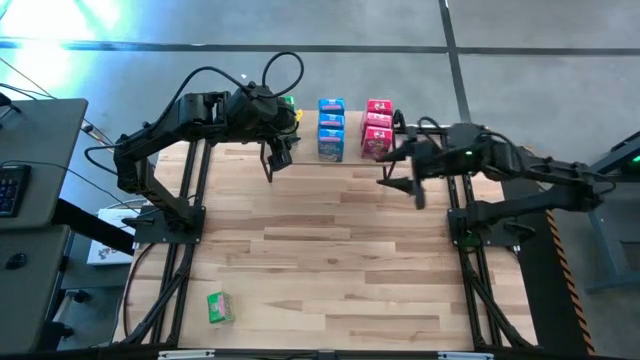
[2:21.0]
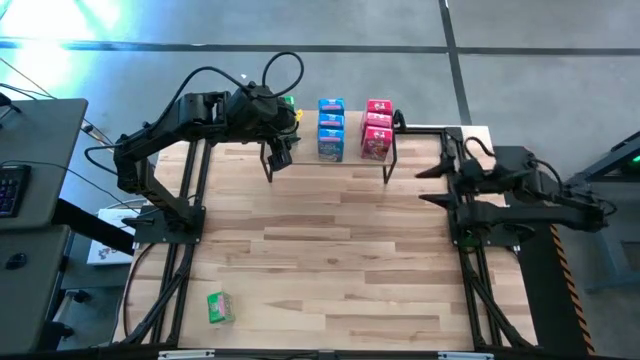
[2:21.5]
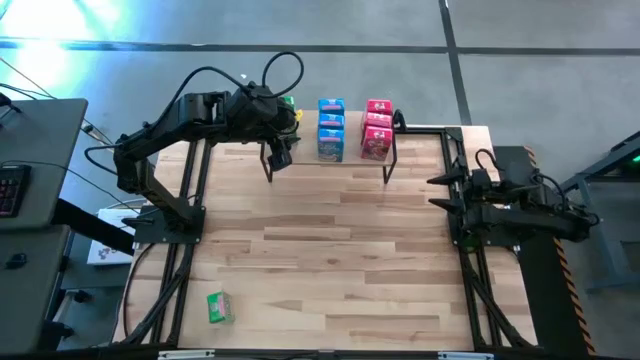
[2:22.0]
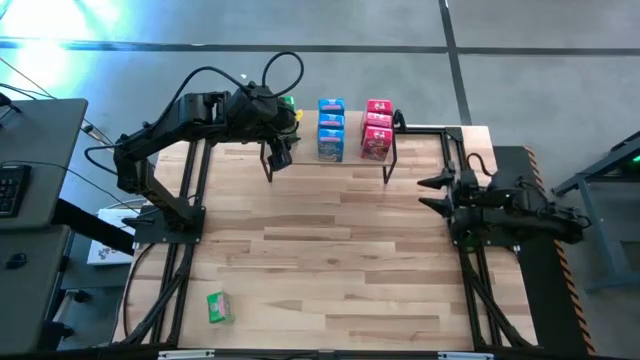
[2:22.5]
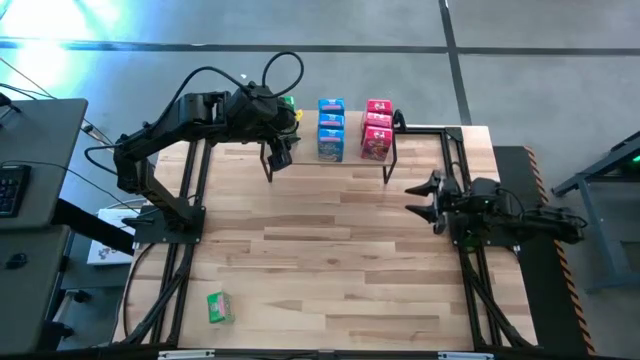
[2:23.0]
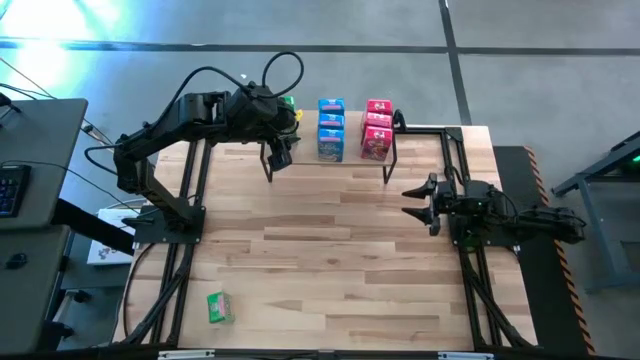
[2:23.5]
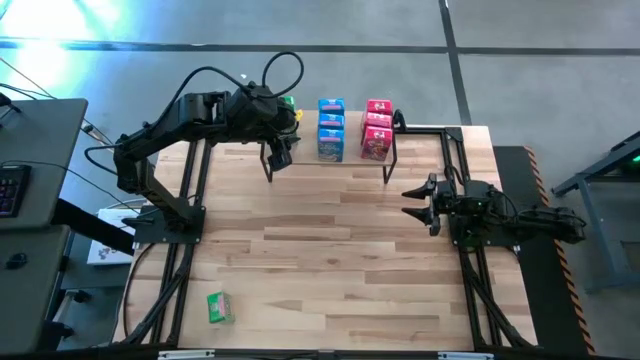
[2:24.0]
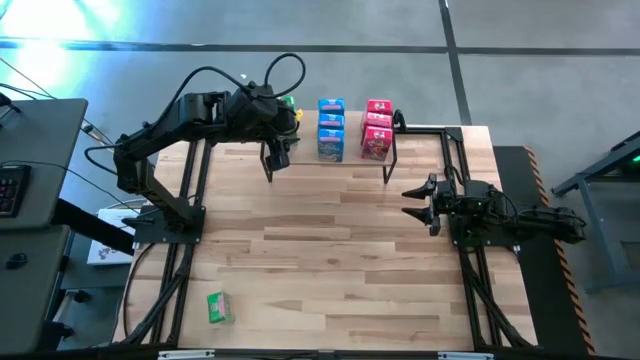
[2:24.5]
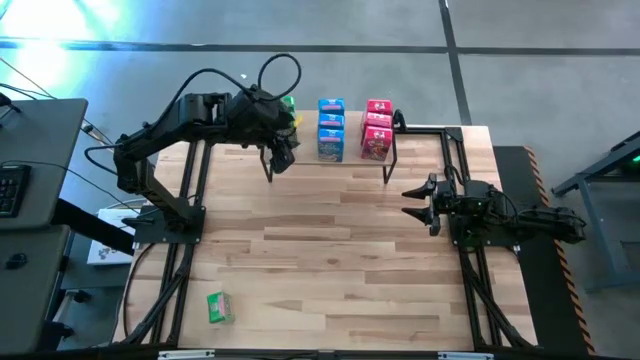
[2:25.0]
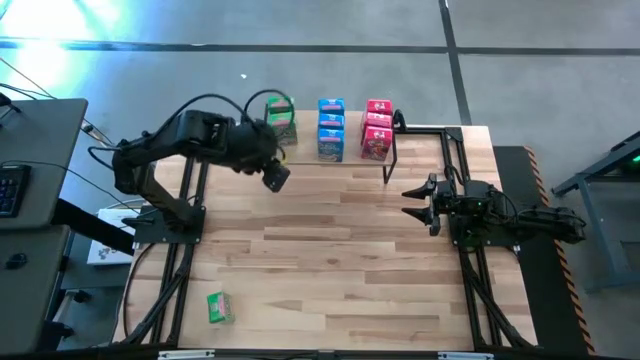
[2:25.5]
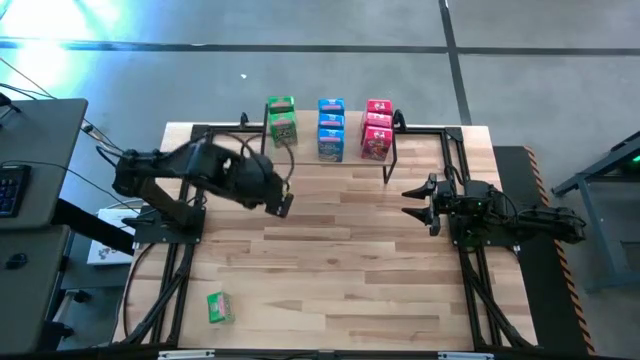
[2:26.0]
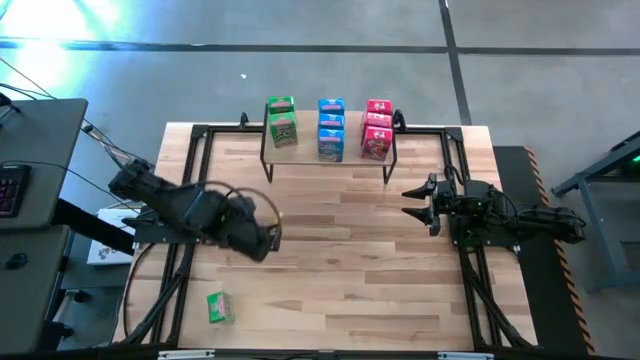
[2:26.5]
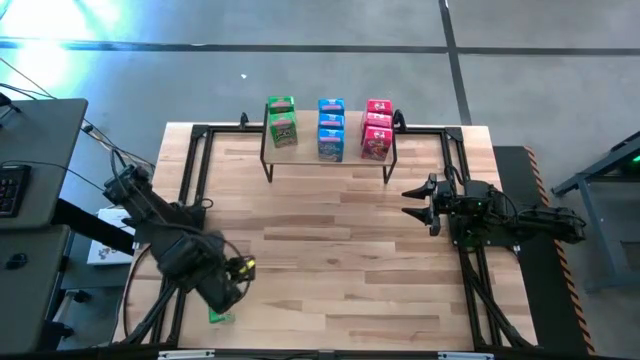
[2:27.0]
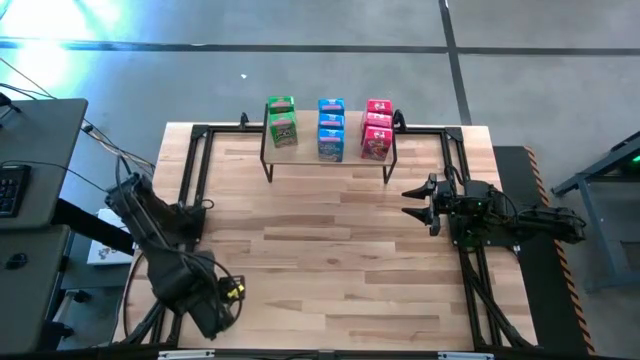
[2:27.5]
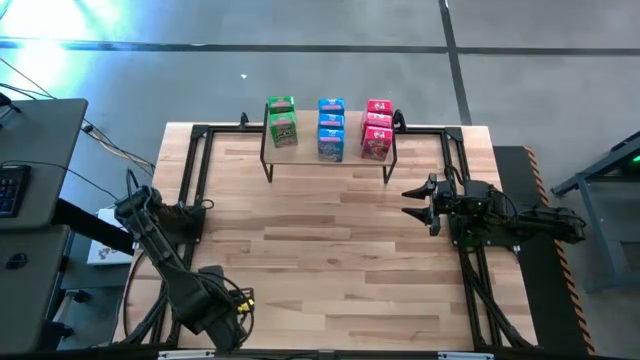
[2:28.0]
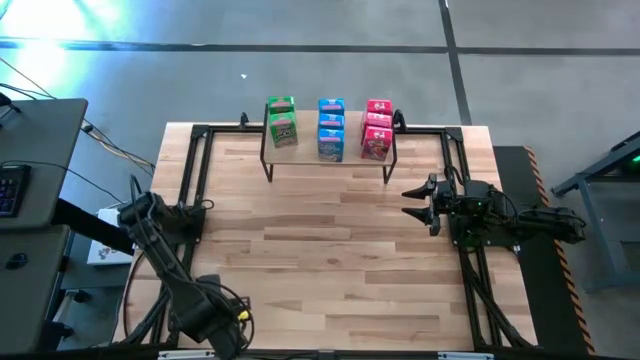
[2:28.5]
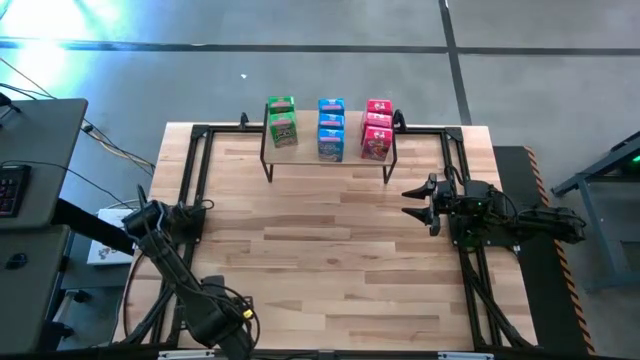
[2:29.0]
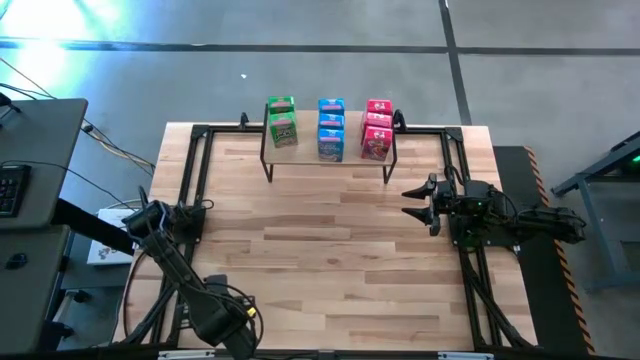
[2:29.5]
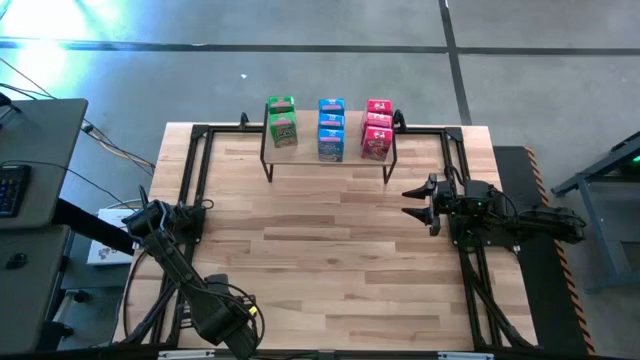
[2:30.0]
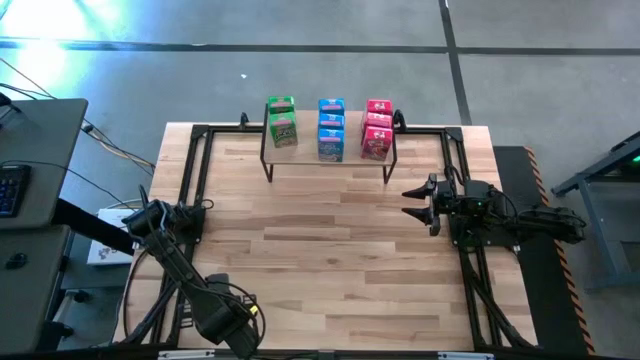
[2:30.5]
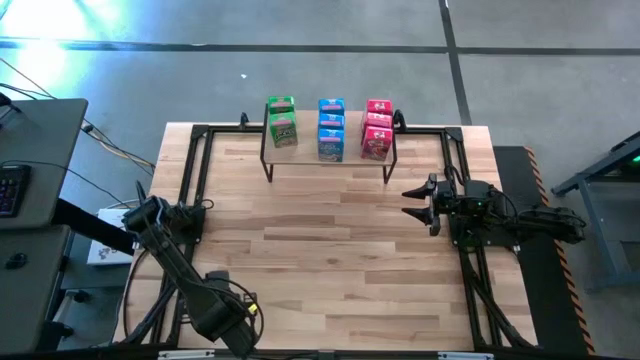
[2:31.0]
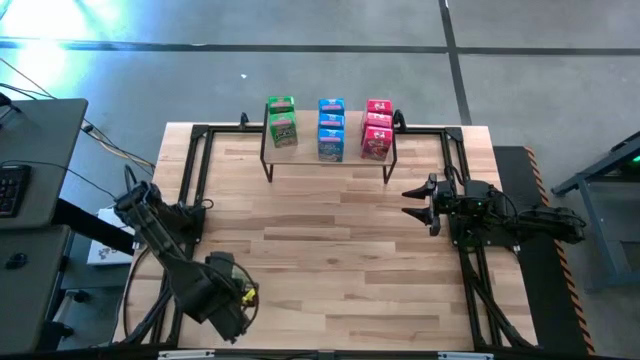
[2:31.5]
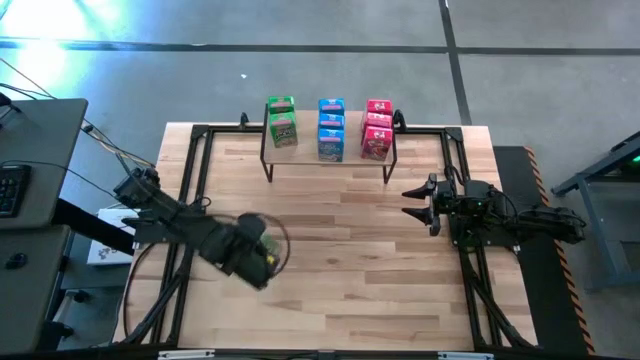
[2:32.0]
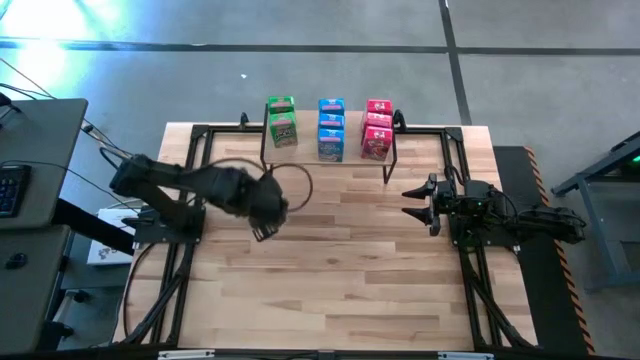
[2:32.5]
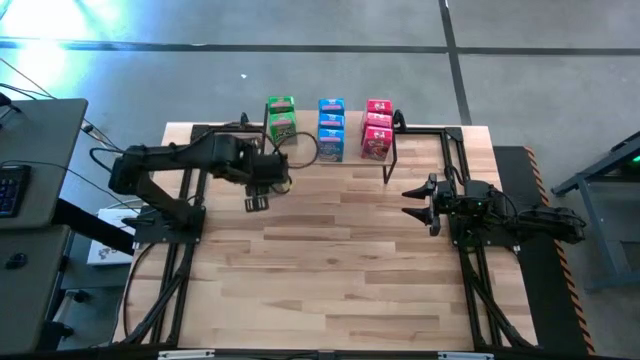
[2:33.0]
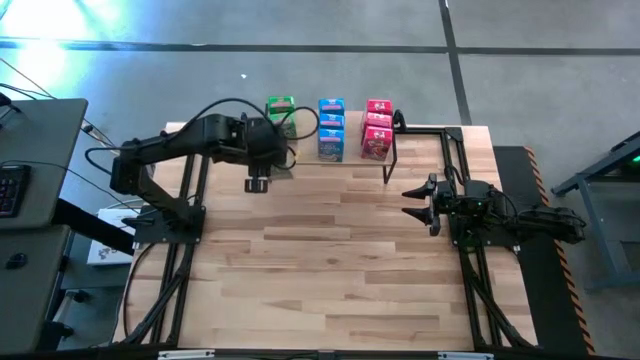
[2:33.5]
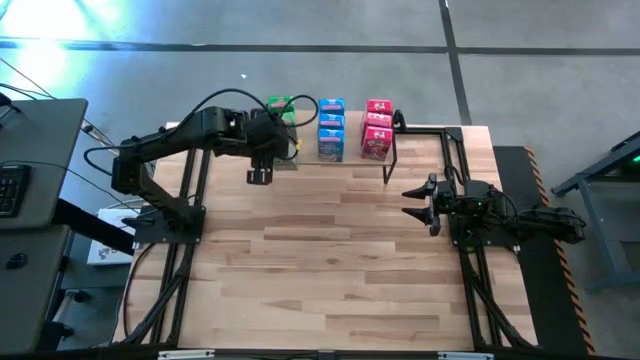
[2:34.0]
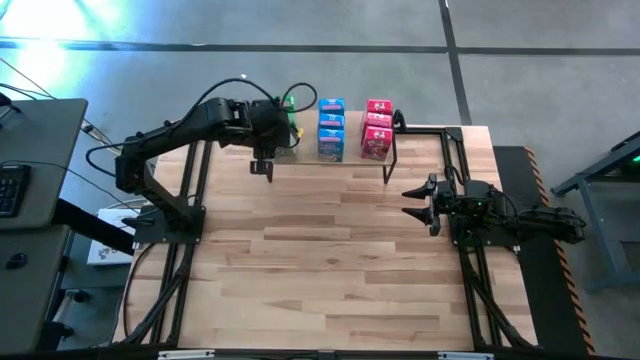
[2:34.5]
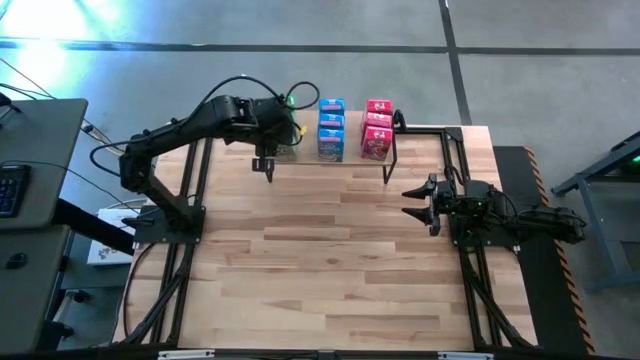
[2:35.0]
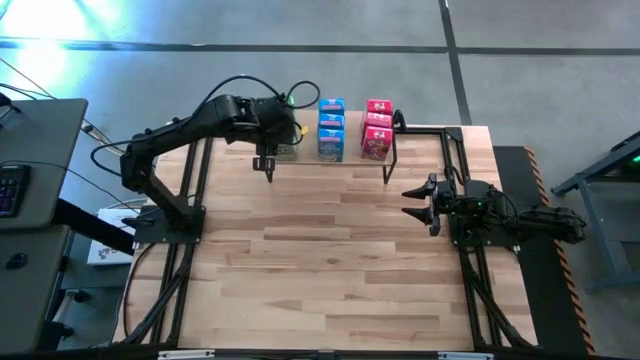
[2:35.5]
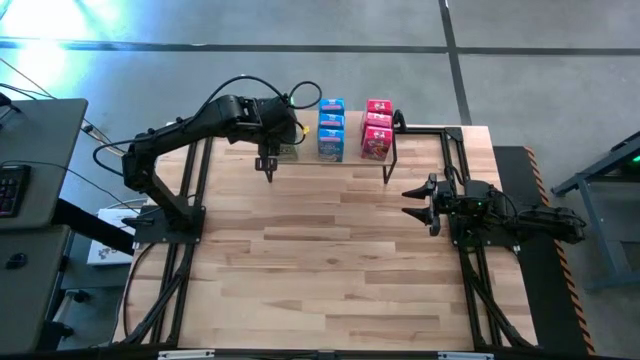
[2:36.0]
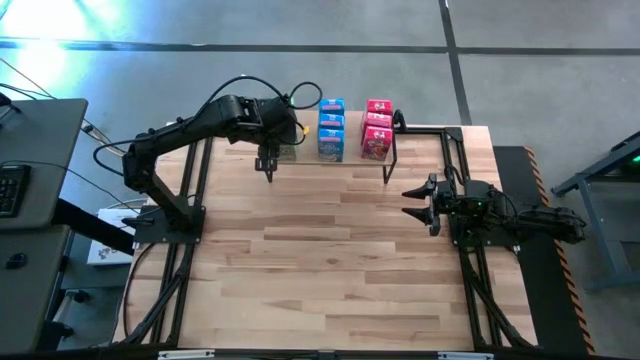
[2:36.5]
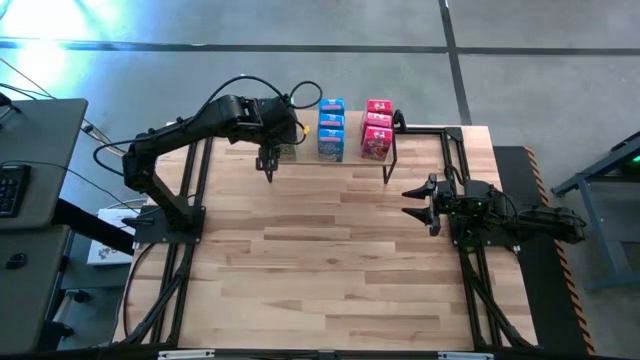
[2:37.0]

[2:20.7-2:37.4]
Task: Stack cereal on shelf
Put the green cereal box on the shelf

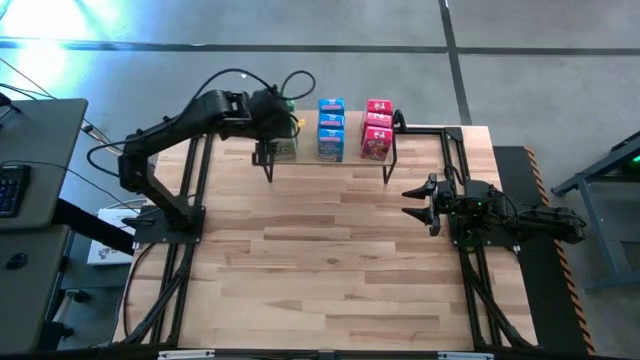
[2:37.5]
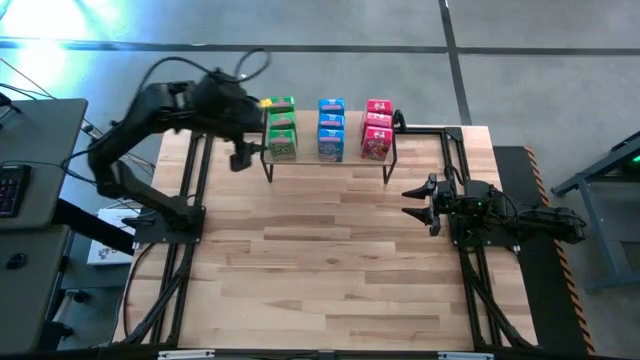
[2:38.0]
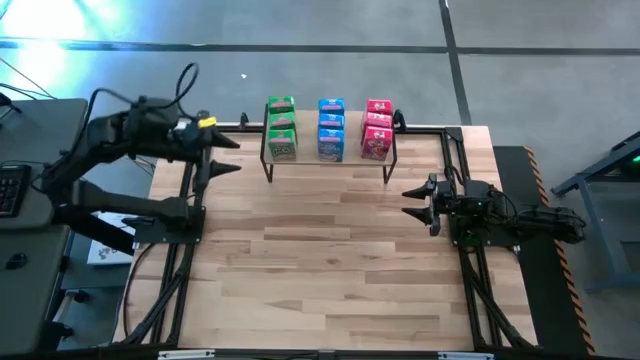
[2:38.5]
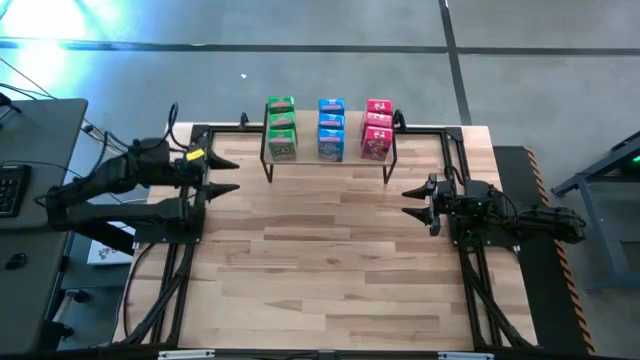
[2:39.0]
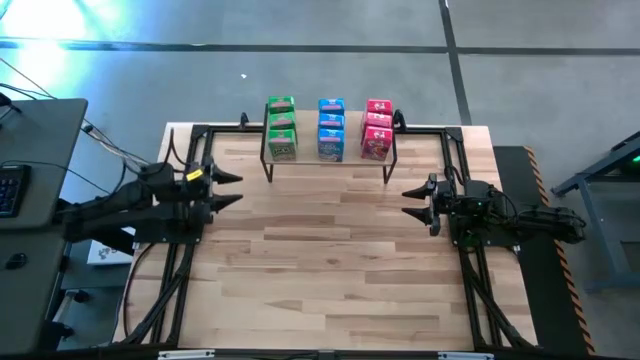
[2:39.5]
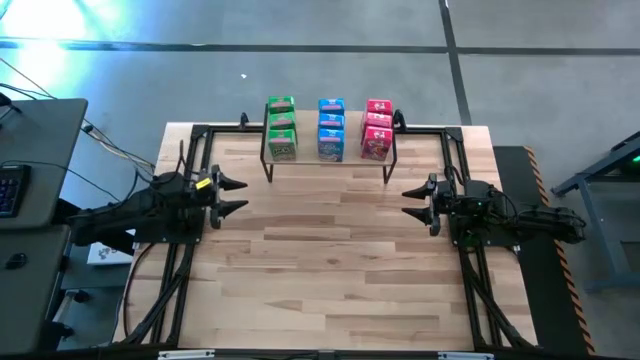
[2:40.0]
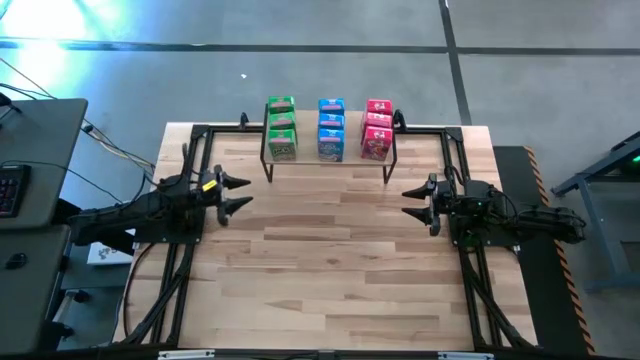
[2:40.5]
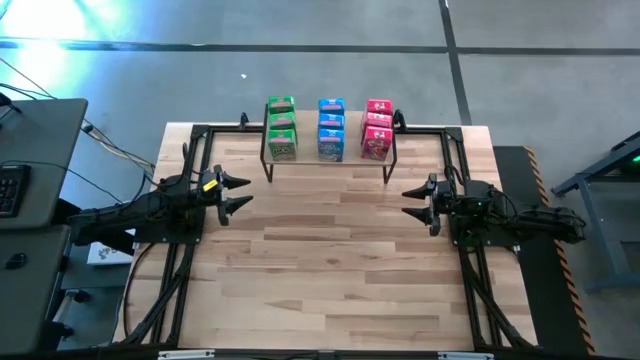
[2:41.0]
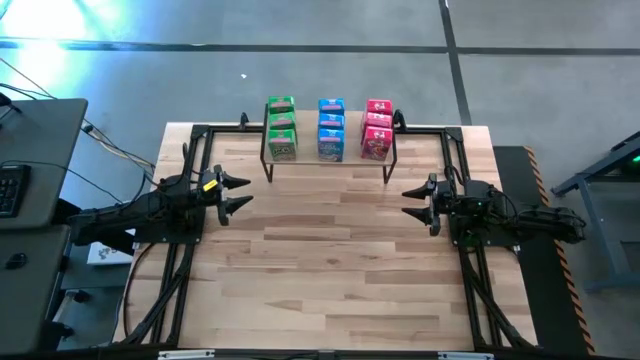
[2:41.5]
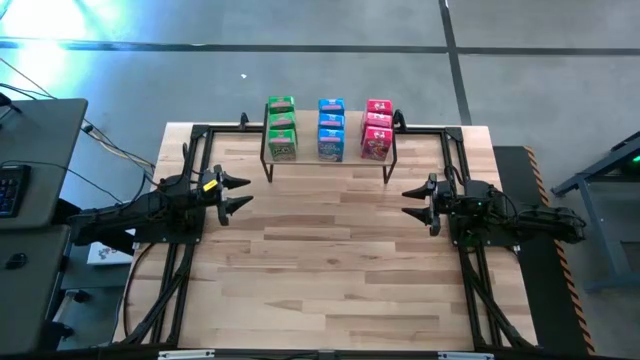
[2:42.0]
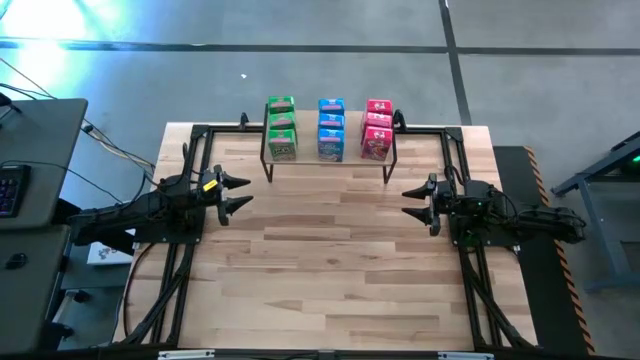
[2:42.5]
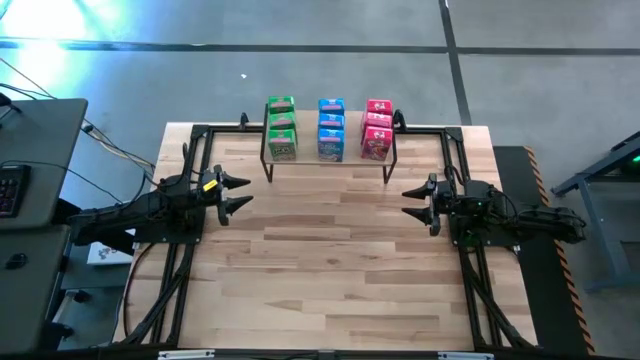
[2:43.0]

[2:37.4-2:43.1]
Return to Home Position
